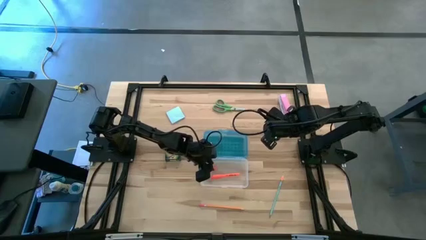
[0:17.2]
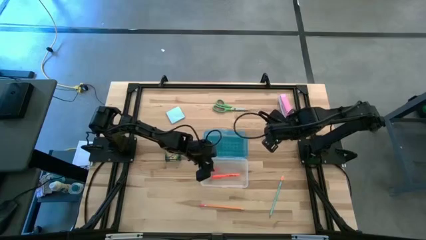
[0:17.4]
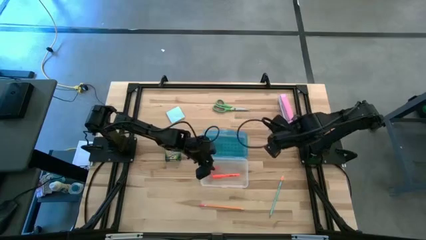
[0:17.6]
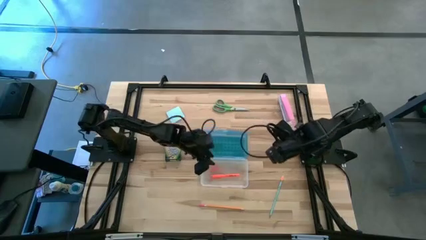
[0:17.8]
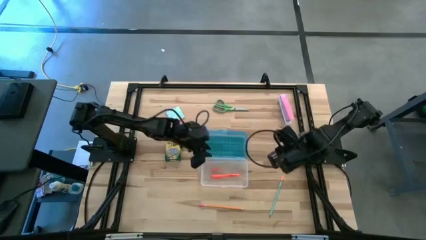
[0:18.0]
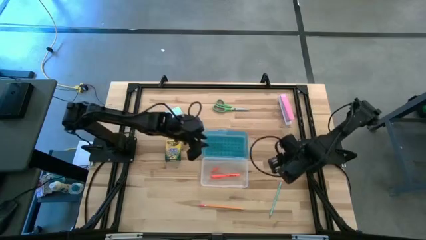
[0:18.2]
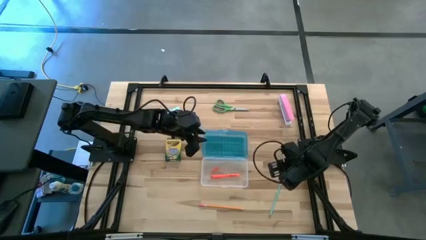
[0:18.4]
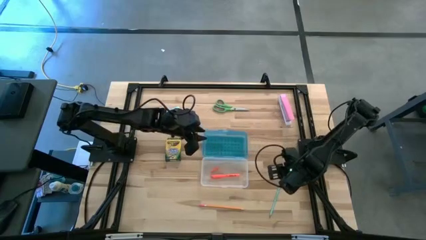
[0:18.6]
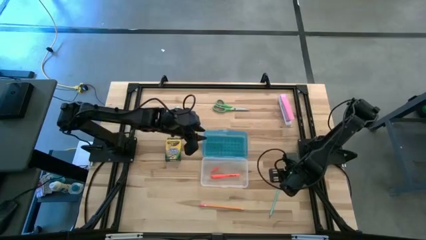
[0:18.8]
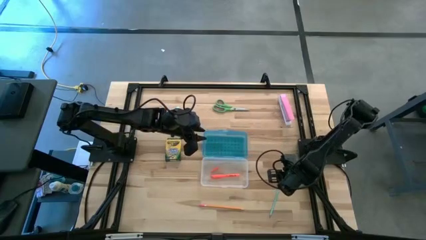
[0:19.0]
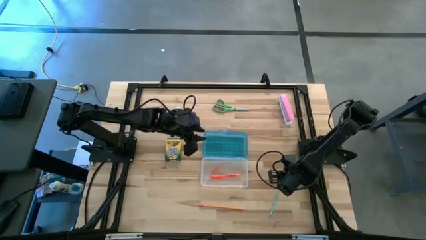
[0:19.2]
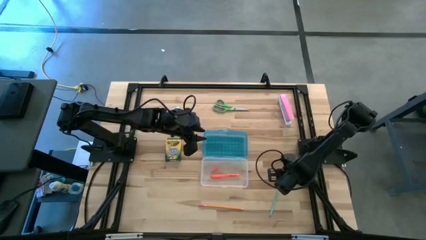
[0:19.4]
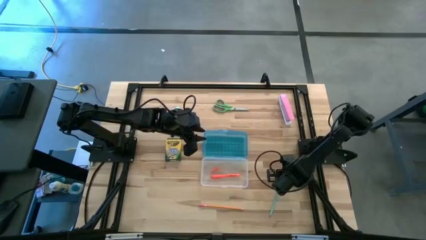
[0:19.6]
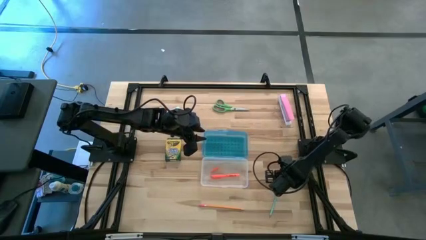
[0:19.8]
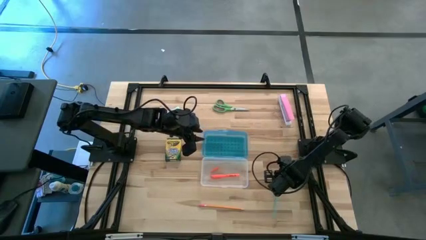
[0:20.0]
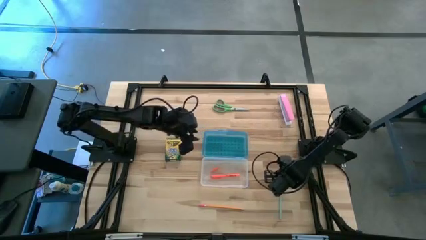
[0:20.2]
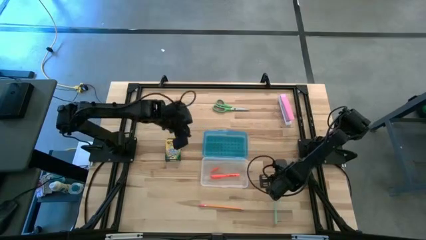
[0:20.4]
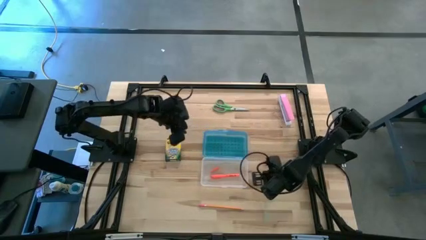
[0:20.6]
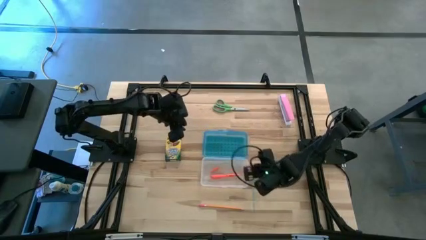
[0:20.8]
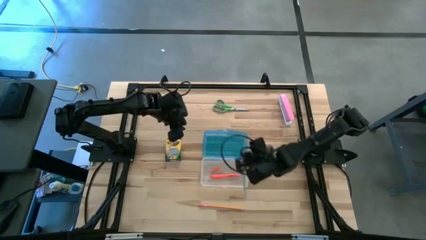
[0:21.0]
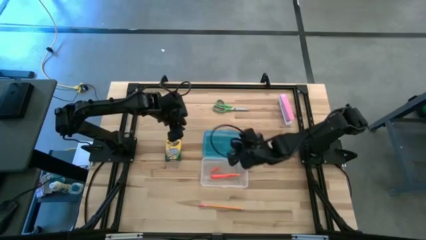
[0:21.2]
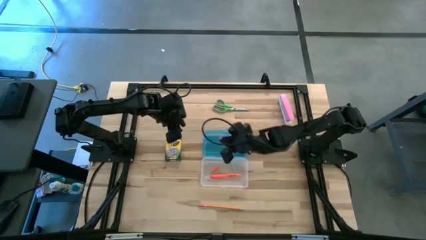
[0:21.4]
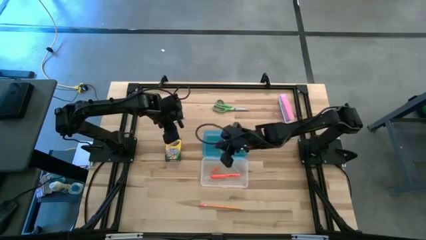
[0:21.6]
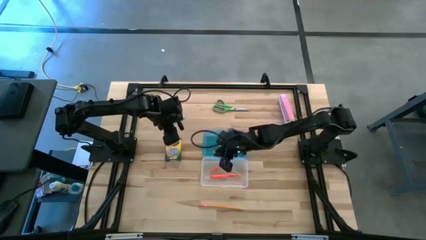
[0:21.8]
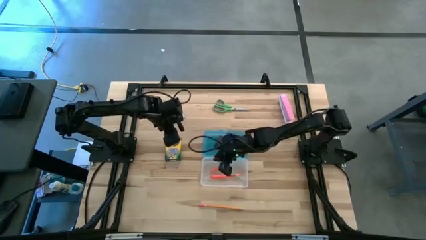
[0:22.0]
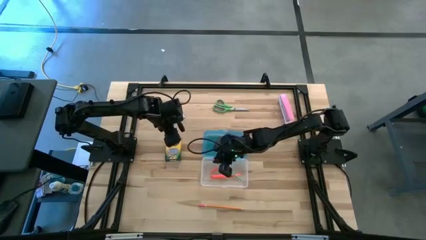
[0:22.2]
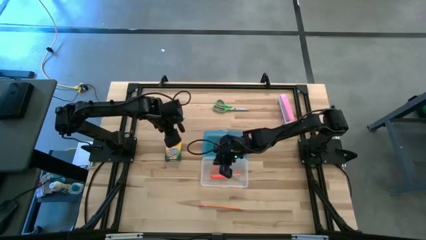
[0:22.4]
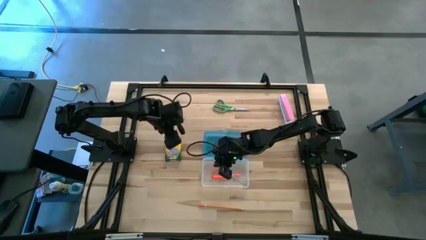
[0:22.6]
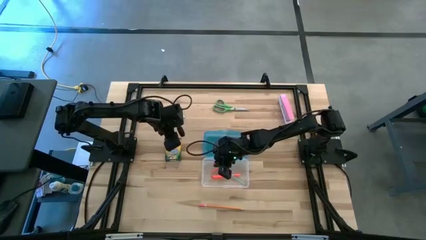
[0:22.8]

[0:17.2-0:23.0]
Task: Pack school essentials
Put the blue pencil into the blue supply box

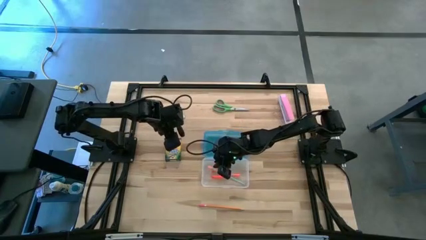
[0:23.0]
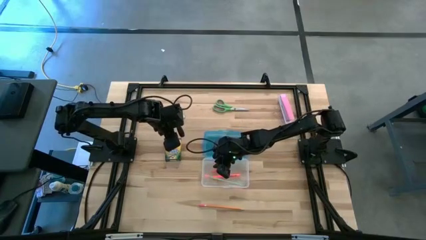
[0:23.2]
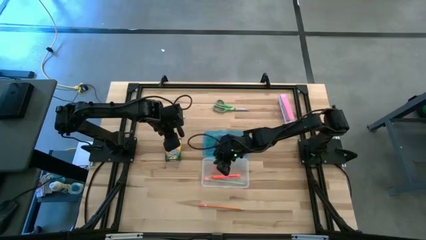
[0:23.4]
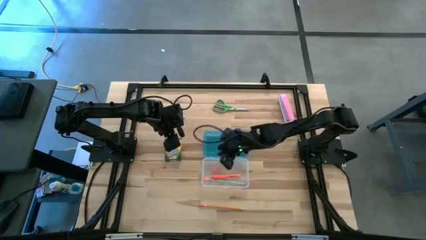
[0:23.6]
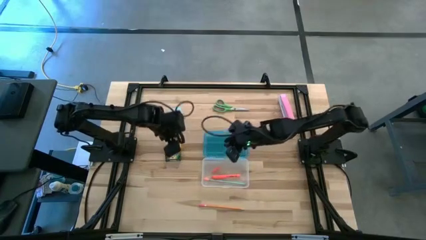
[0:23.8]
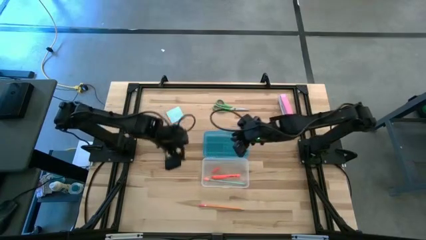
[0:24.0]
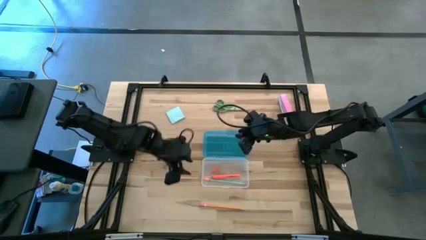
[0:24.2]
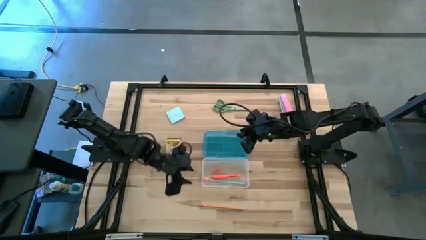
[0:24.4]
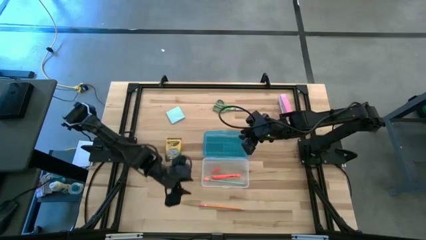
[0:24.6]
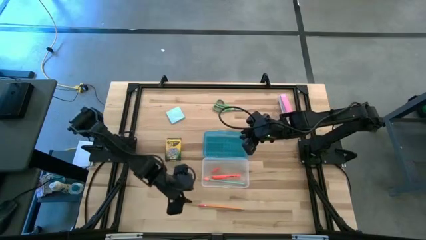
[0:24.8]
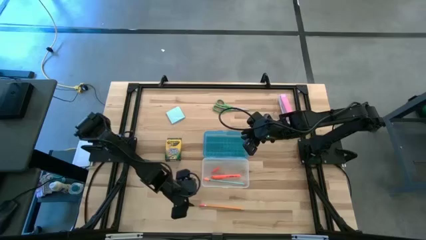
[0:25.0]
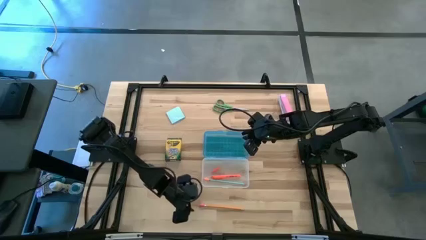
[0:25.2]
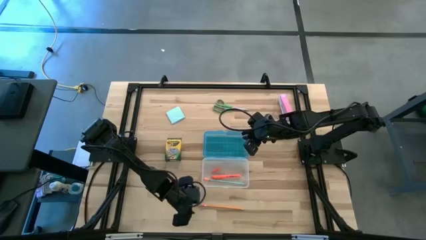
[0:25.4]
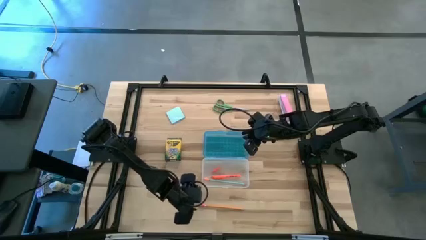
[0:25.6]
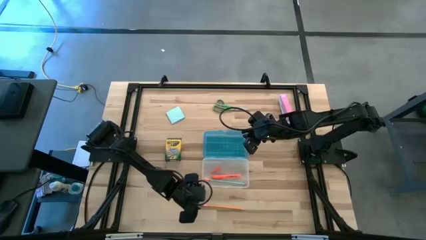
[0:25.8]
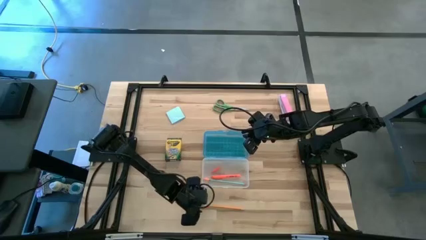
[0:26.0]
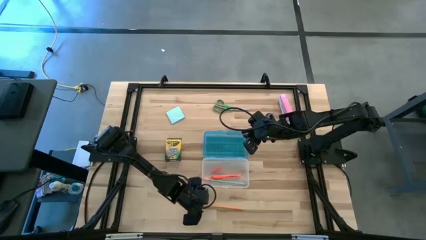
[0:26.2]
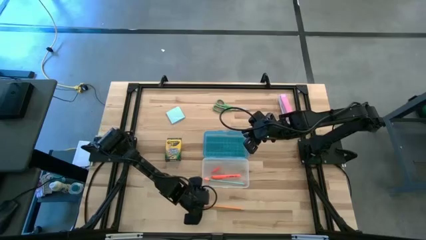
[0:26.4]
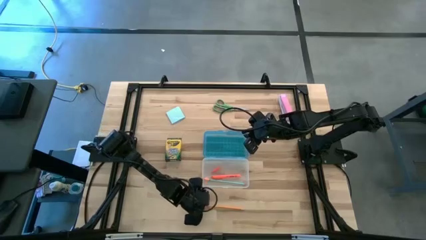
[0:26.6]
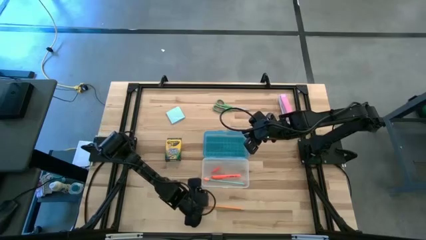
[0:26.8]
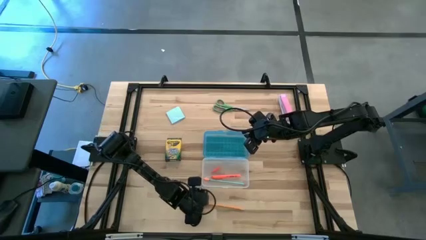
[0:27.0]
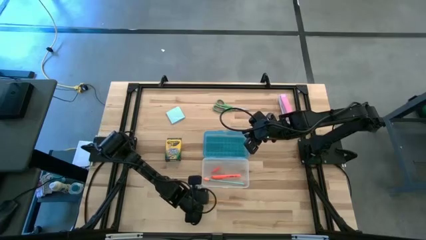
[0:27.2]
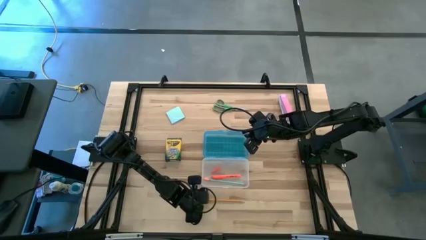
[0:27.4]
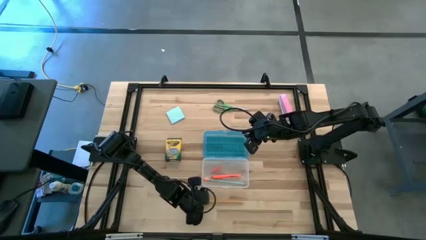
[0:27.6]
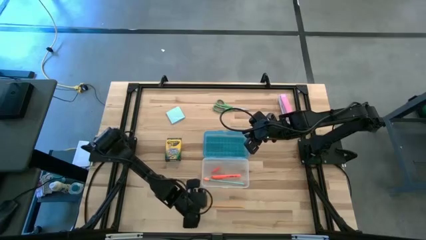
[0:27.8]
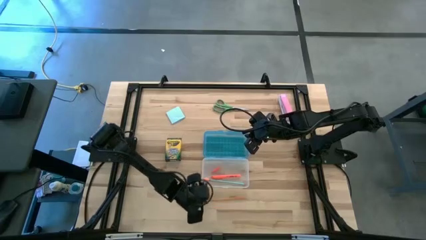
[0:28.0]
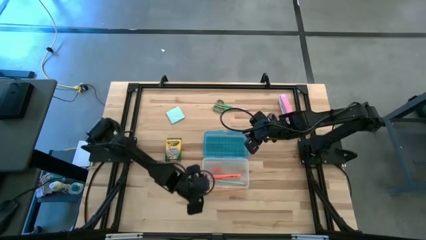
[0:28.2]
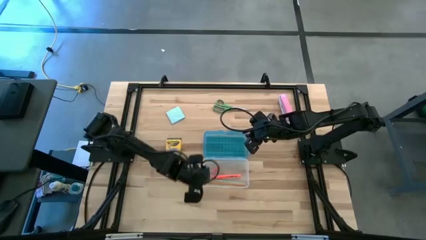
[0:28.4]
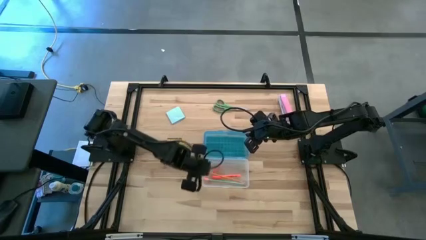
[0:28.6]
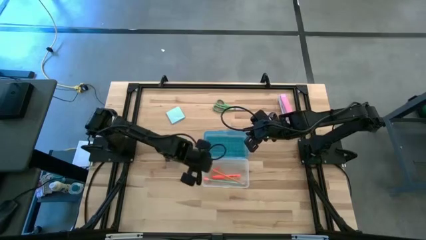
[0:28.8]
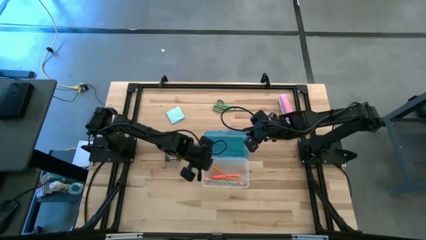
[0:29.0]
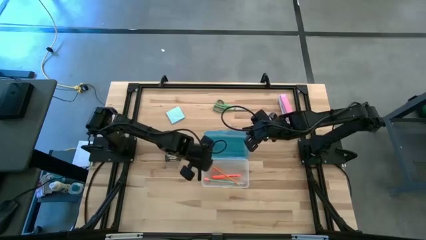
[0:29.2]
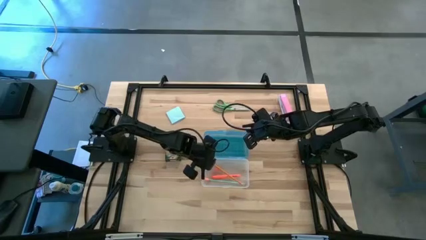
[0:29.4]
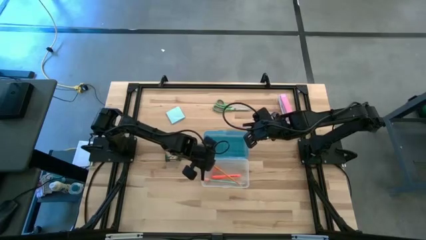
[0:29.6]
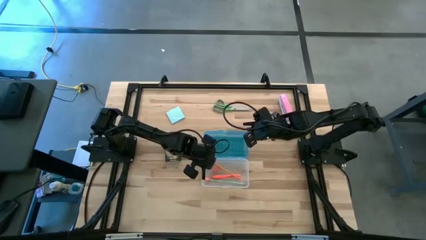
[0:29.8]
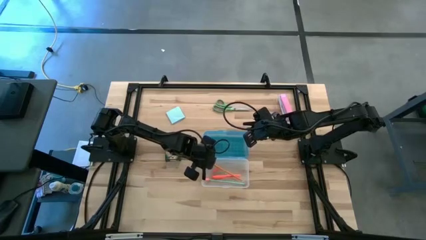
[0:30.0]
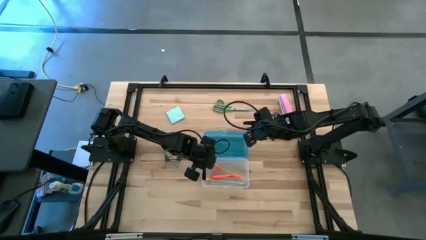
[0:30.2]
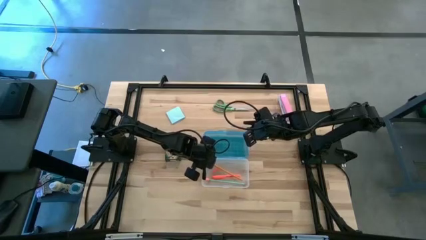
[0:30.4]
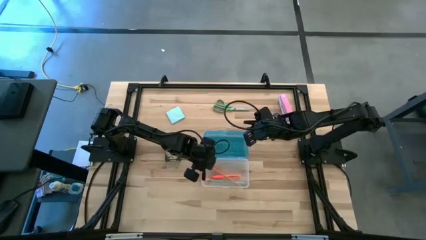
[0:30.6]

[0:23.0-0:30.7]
Put the orange pencil into the blue supply box

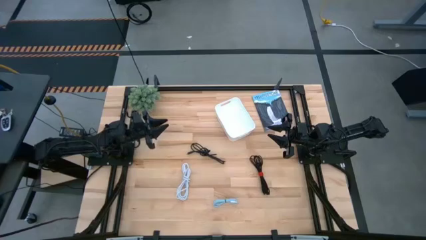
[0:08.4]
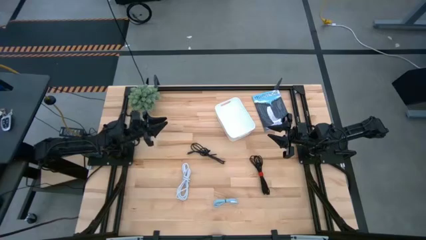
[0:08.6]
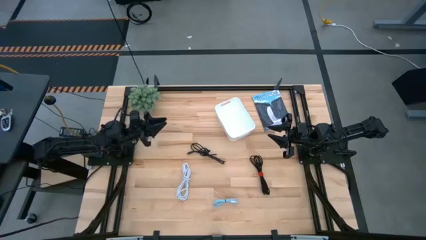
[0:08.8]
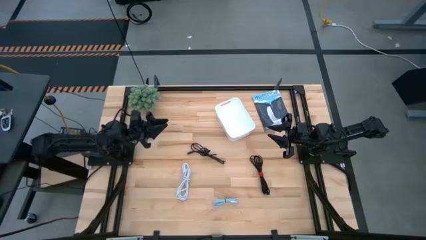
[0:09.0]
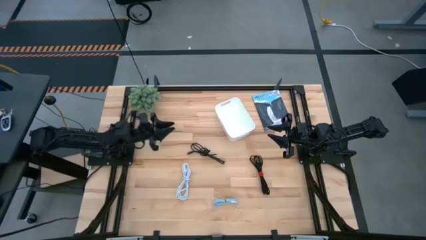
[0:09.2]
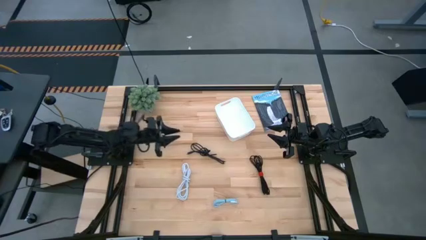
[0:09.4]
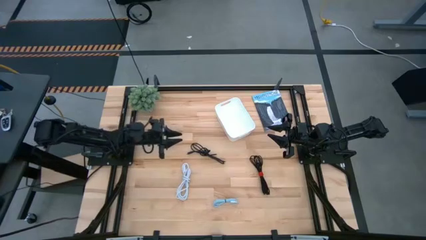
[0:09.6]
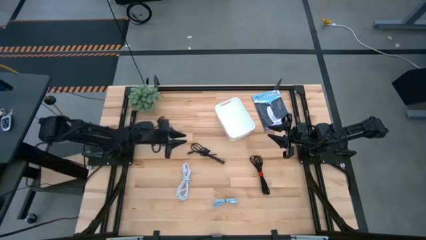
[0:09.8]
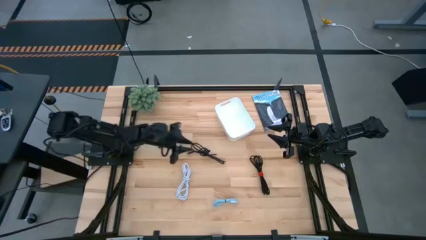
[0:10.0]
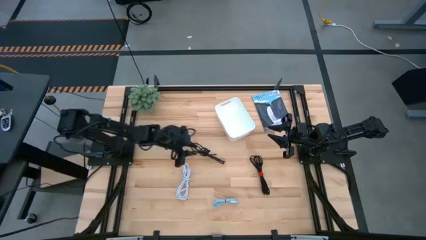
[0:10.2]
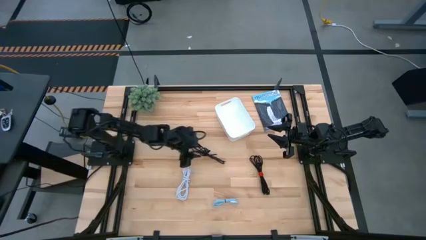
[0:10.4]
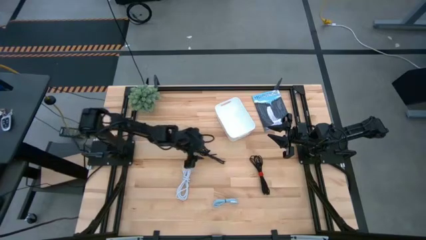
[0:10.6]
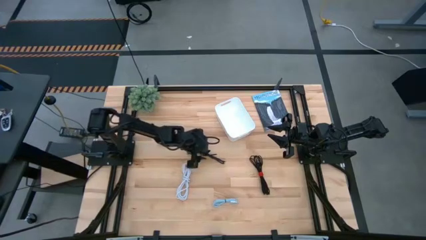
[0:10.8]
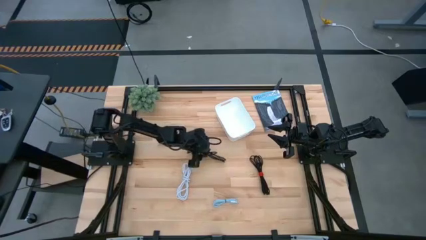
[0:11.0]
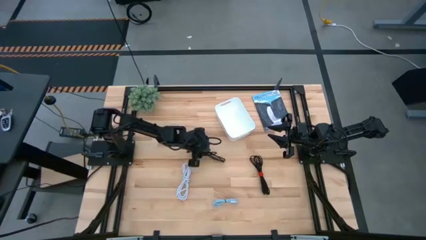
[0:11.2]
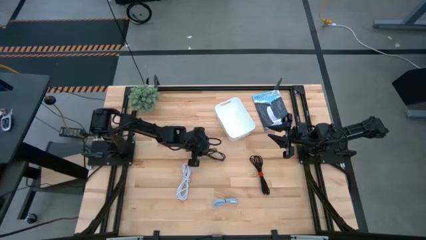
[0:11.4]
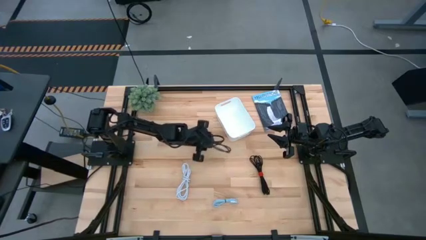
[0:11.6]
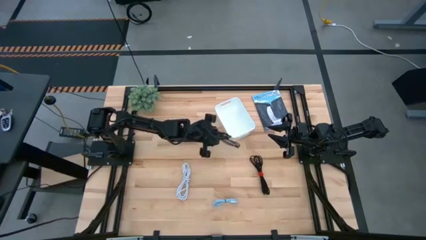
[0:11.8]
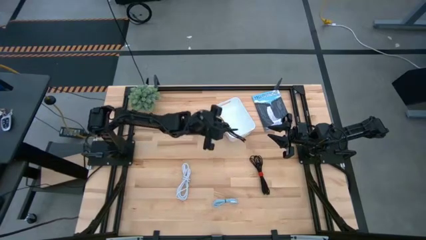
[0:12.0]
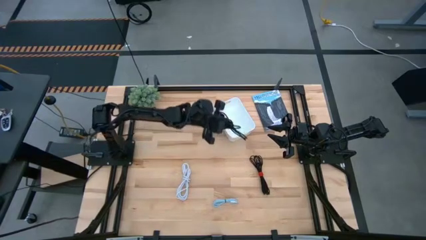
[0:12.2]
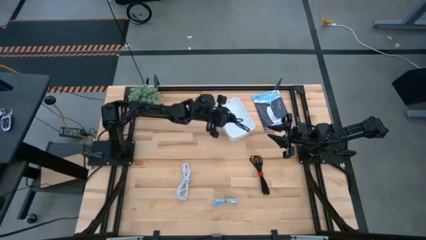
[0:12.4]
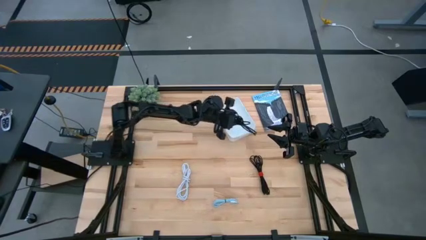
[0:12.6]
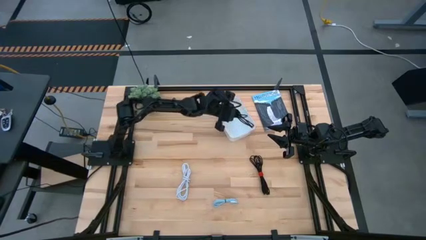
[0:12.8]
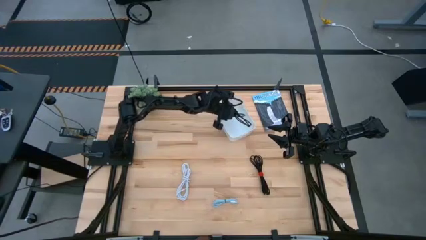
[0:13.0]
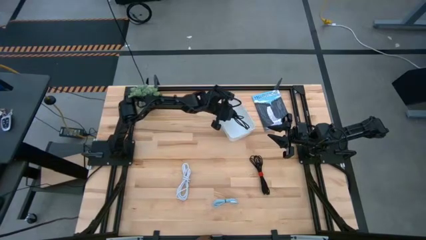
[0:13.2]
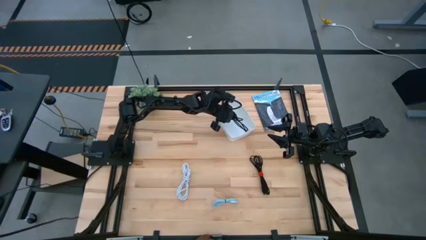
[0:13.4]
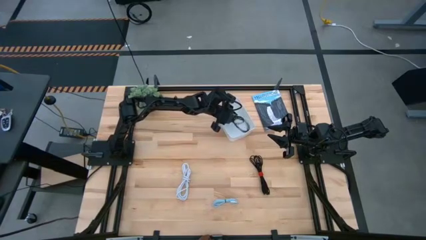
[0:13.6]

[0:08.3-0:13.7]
Task: Pick and place USB-C Cables
Put the top black charger cable into the white bin
